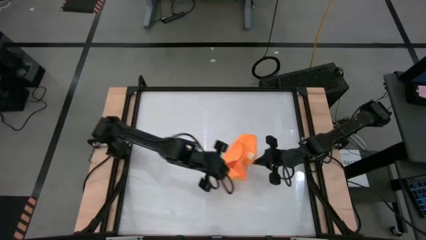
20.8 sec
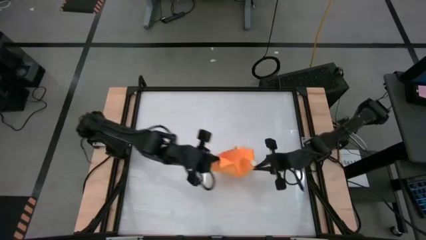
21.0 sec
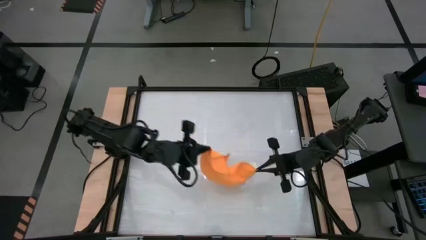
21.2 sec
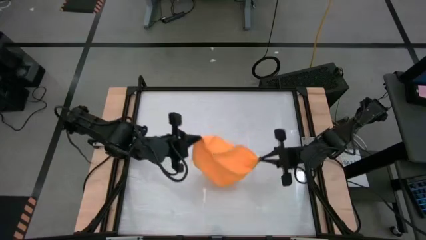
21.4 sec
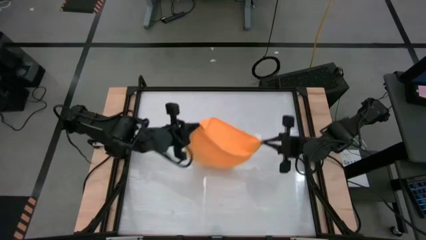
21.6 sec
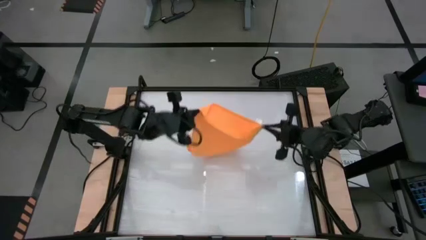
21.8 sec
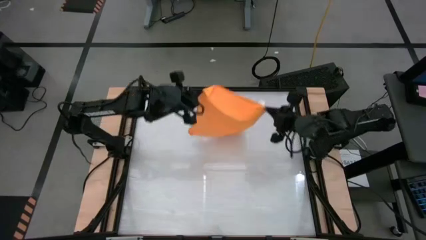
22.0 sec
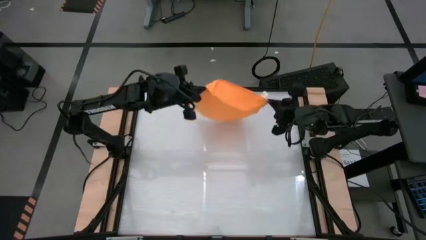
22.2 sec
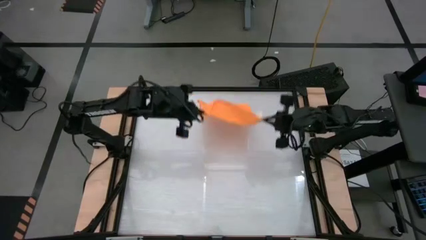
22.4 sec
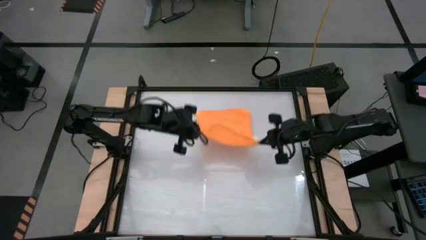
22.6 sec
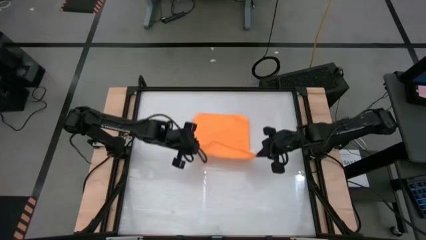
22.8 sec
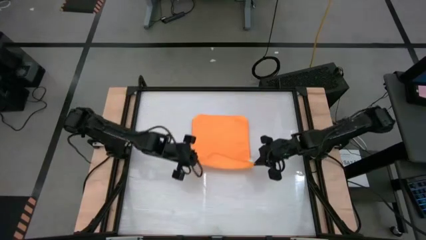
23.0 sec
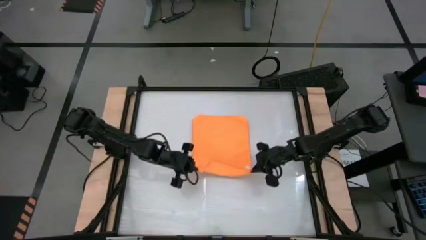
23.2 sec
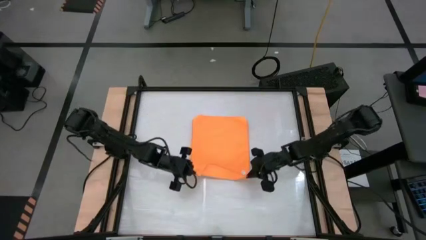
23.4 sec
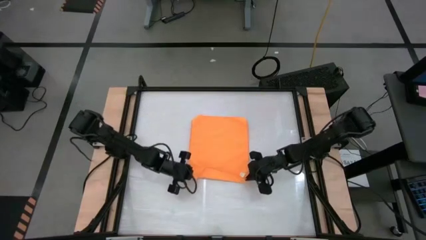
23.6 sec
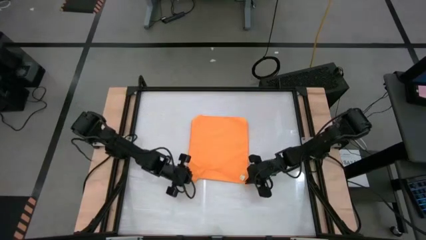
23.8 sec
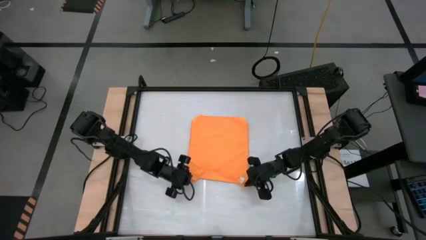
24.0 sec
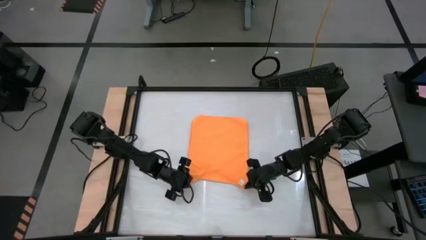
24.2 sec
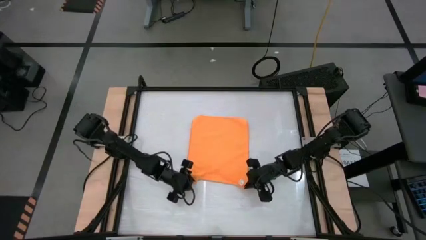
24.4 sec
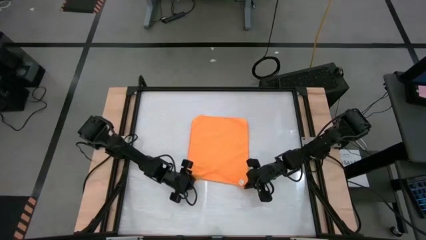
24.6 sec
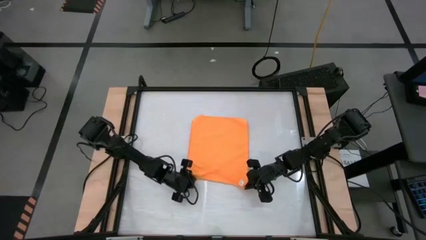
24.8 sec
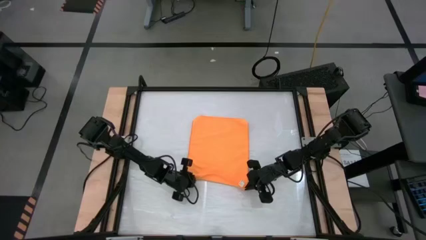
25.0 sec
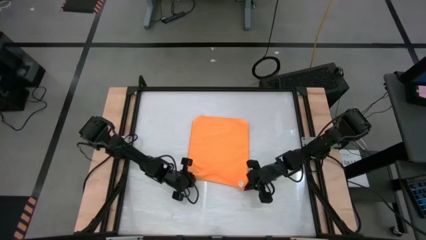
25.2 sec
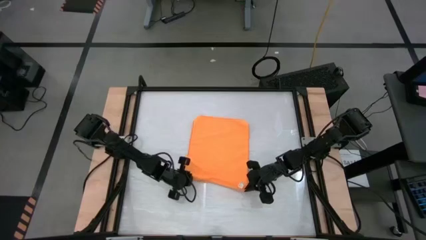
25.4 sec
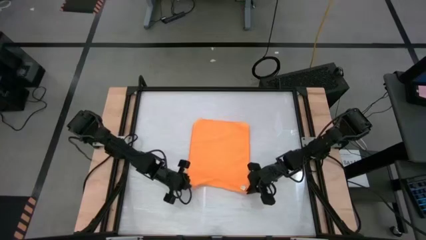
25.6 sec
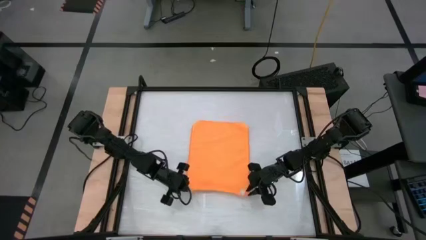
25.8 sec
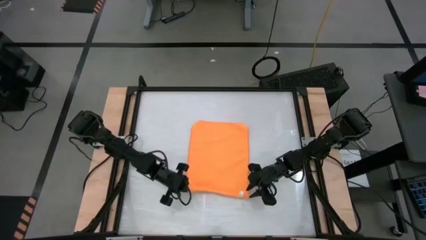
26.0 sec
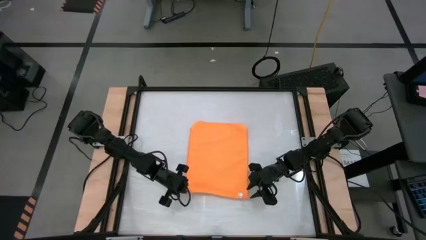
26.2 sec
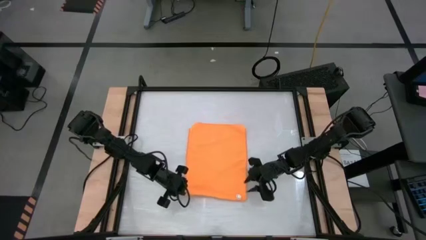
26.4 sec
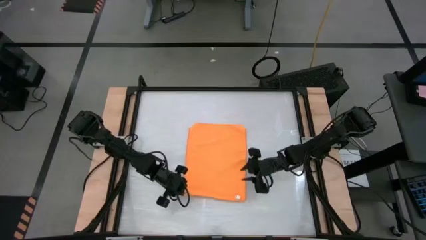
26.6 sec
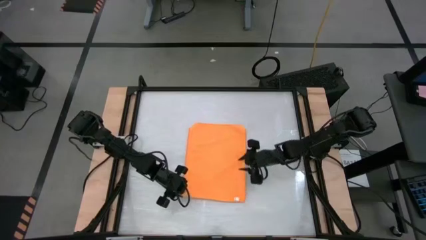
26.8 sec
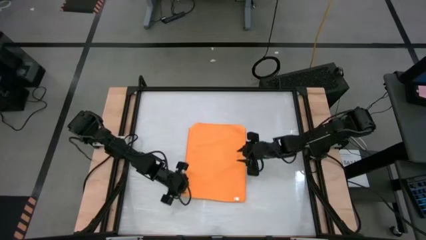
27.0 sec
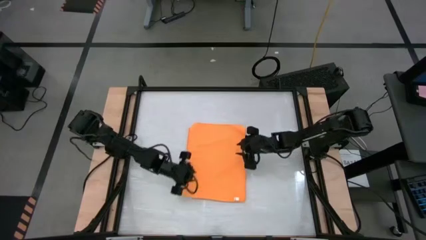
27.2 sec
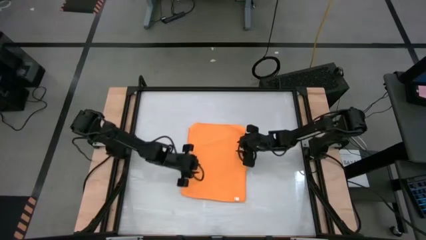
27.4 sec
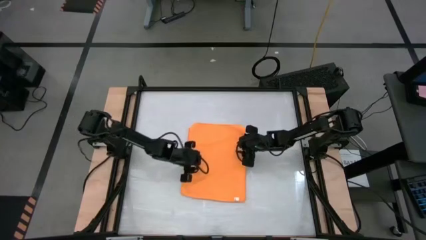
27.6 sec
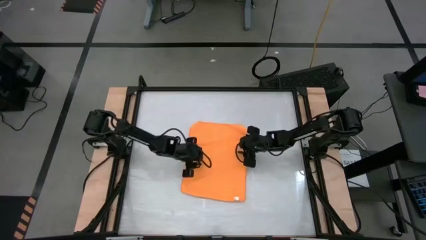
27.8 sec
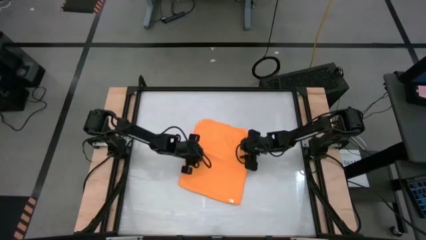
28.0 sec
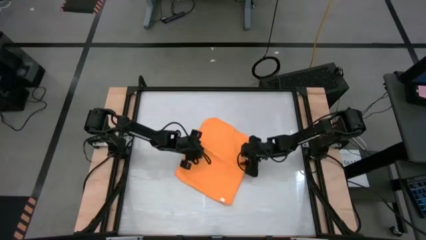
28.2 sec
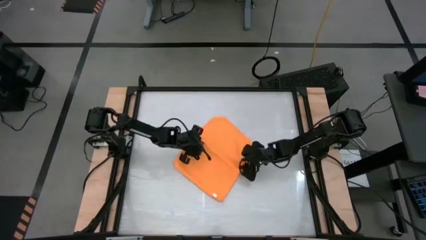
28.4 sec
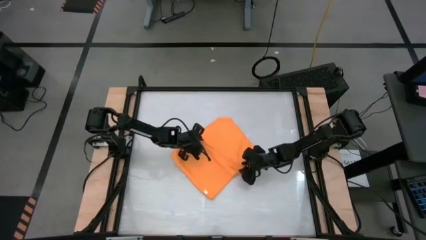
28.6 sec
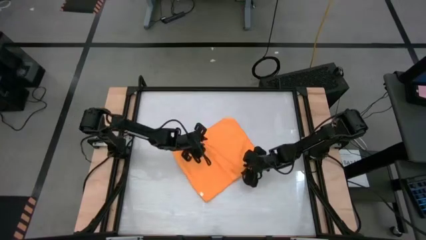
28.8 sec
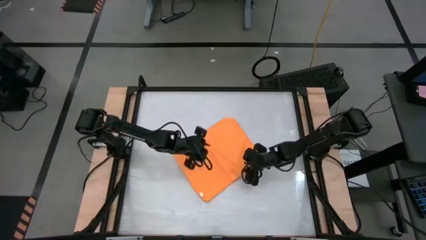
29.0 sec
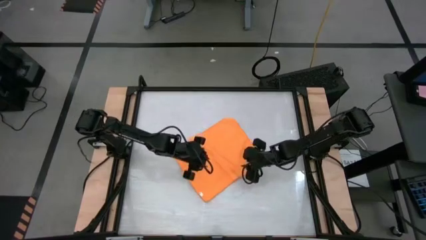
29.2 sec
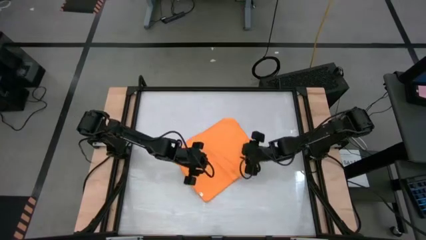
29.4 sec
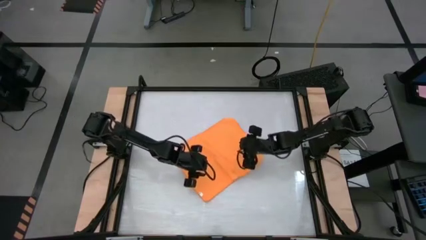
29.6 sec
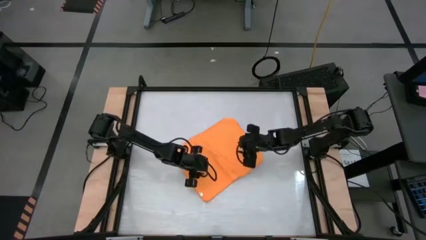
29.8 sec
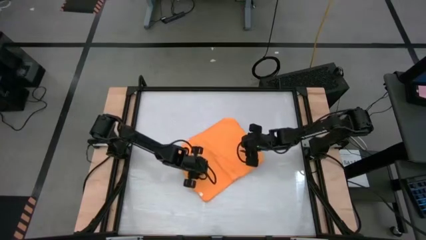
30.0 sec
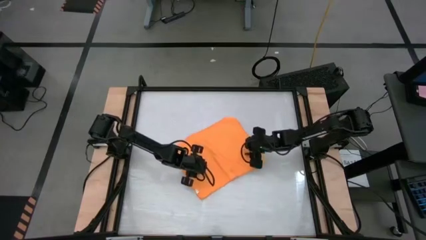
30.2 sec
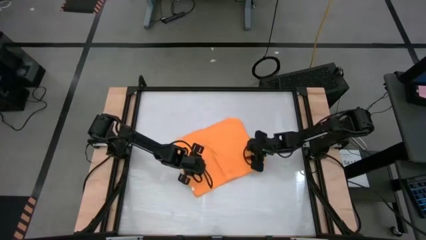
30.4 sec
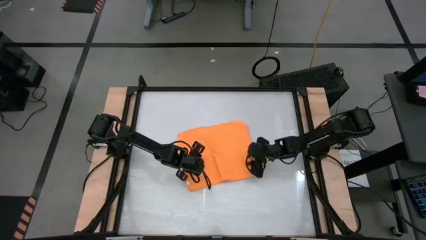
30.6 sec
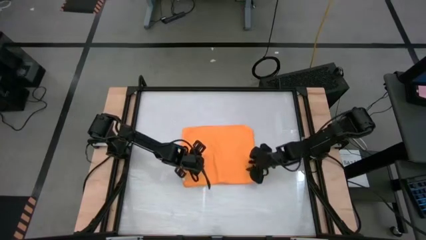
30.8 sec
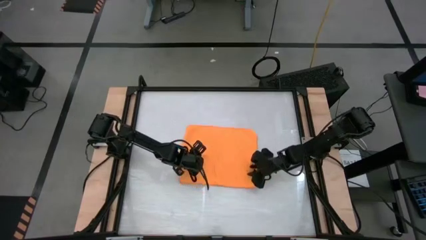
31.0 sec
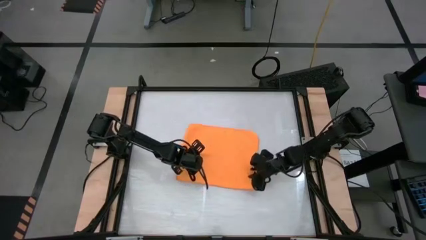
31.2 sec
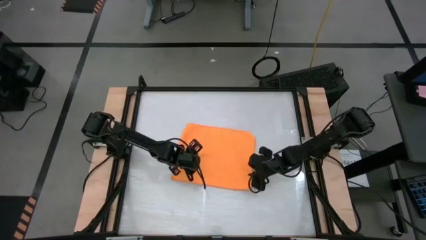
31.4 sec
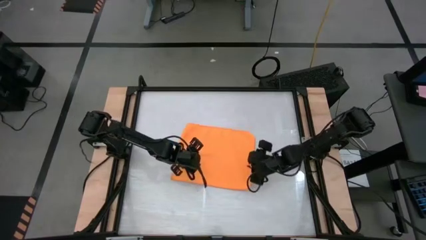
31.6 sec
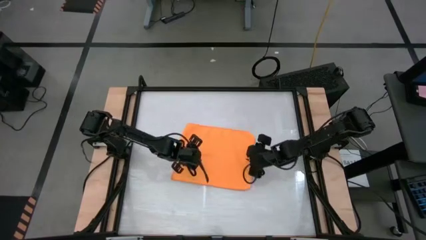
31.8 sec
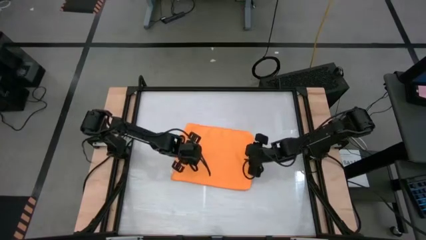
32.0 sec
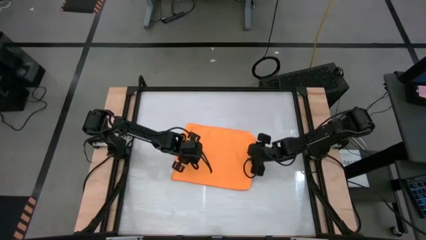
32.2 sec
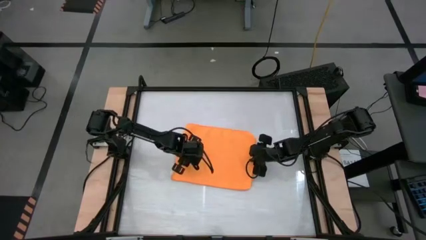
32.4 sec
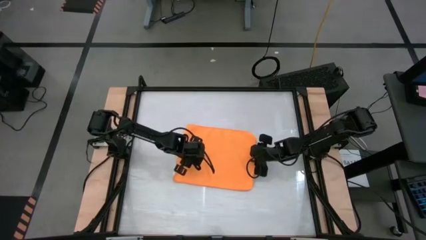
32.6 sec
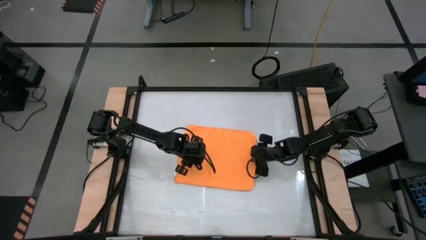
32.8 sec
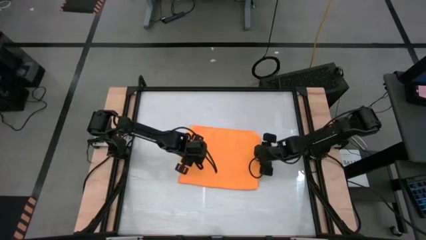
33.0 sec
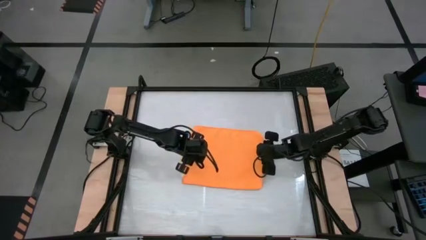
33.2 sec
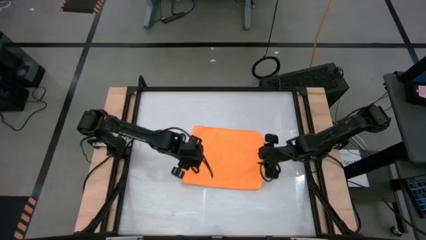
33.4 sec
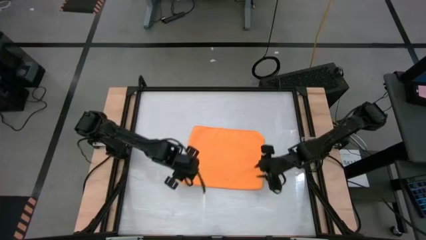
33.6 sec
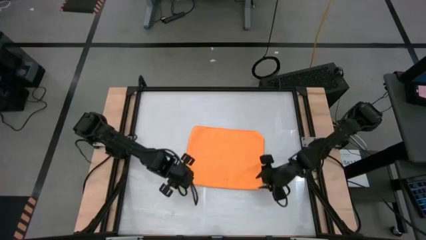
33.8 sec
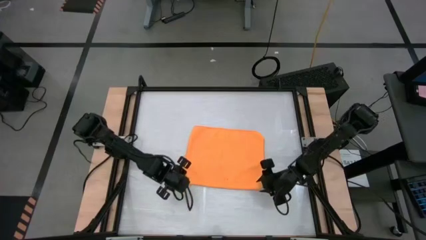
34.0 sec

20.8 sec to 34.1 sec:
Task: Roll towel
Fold the orange towel
